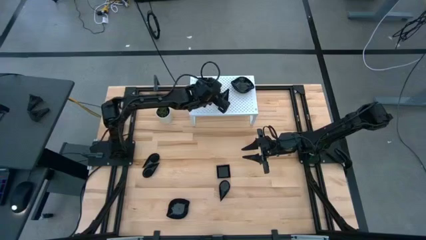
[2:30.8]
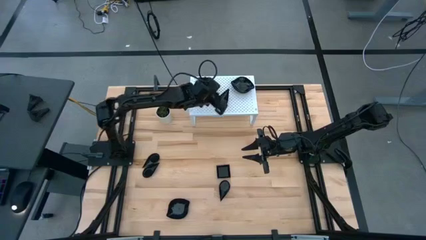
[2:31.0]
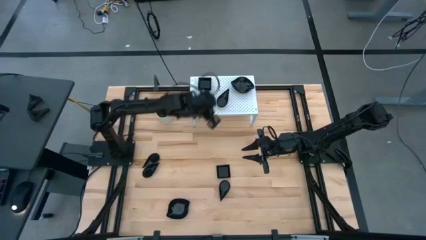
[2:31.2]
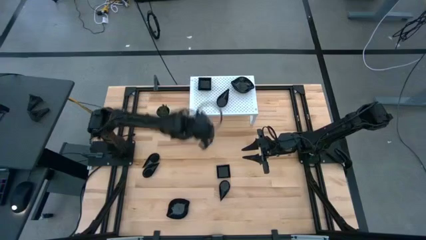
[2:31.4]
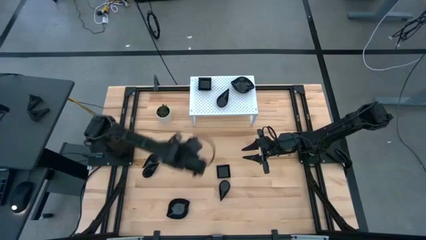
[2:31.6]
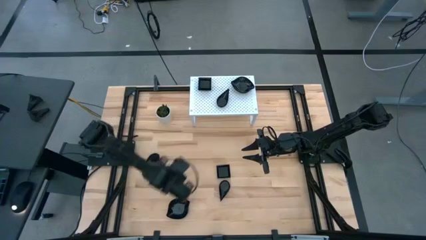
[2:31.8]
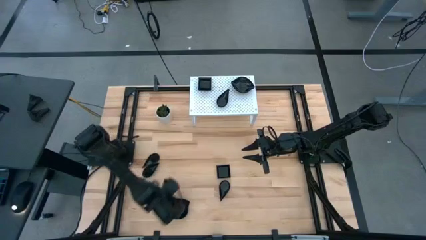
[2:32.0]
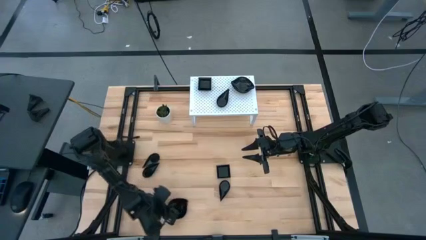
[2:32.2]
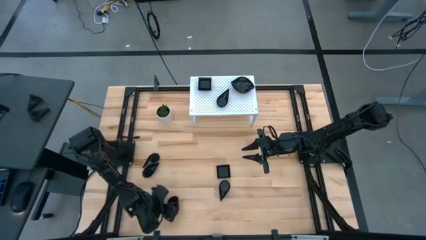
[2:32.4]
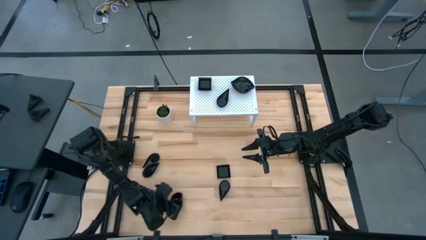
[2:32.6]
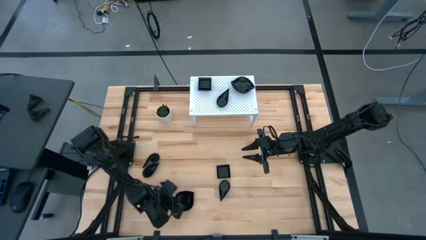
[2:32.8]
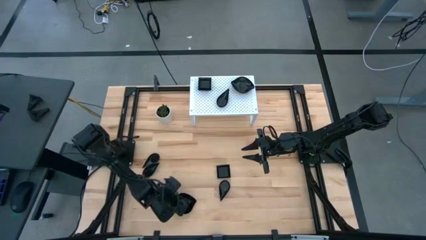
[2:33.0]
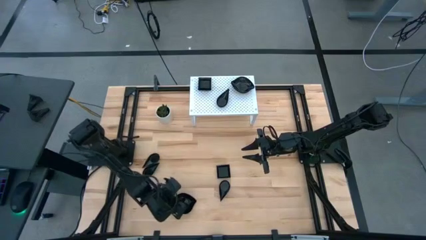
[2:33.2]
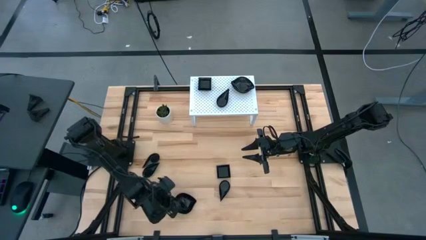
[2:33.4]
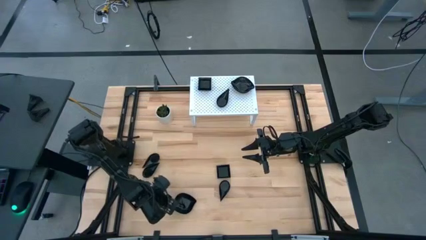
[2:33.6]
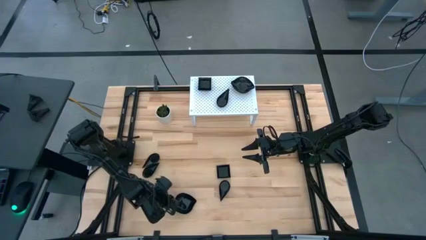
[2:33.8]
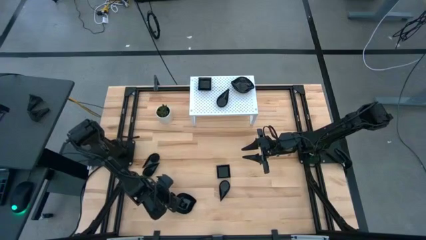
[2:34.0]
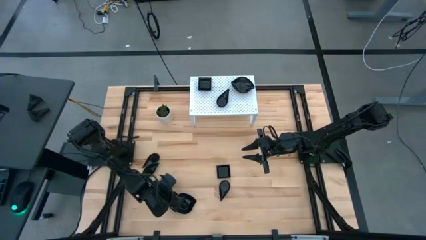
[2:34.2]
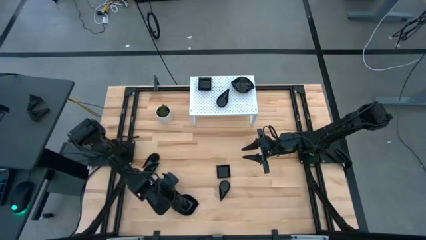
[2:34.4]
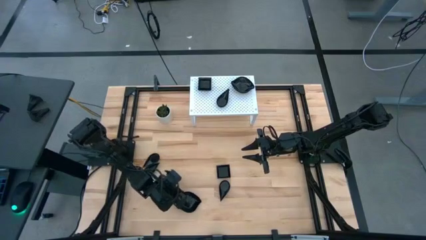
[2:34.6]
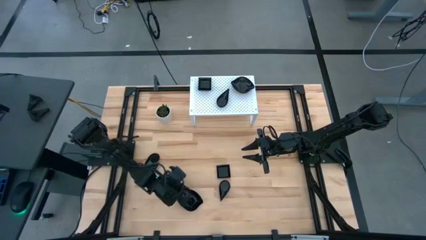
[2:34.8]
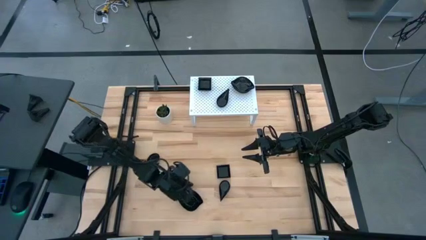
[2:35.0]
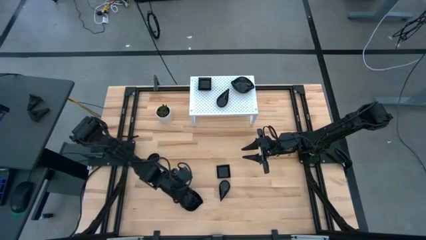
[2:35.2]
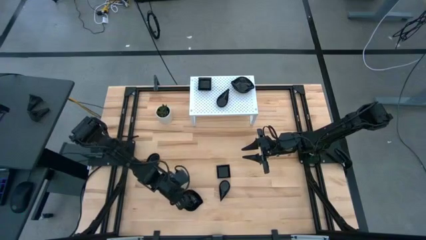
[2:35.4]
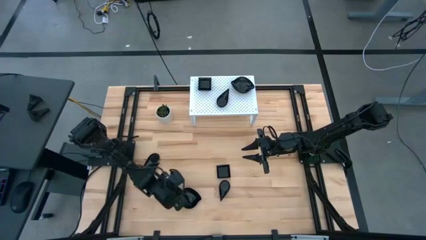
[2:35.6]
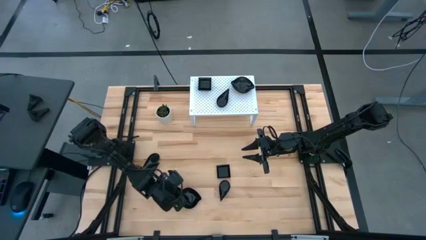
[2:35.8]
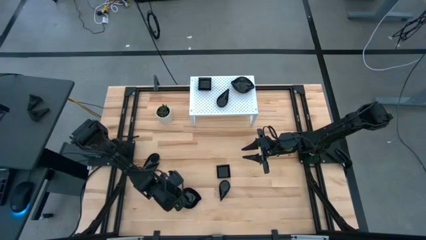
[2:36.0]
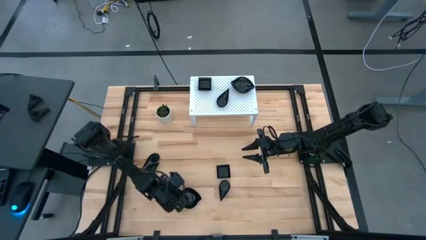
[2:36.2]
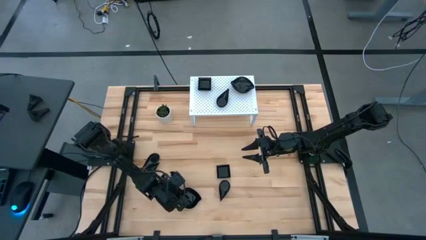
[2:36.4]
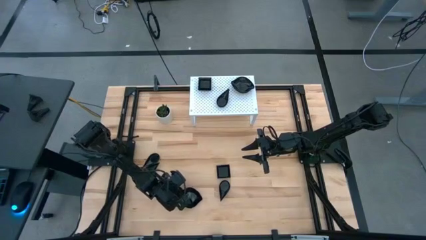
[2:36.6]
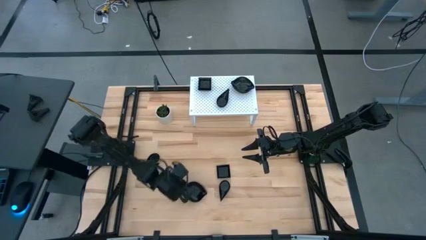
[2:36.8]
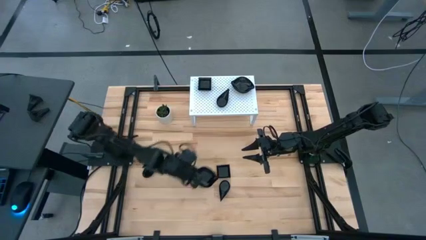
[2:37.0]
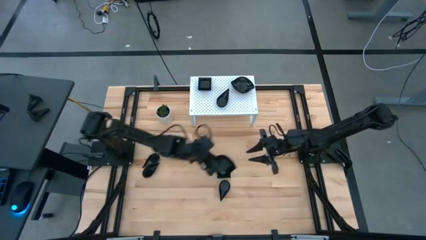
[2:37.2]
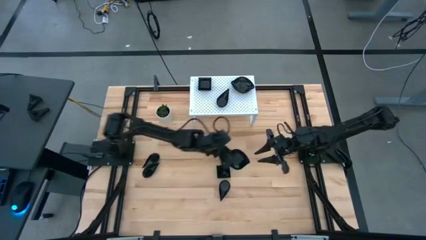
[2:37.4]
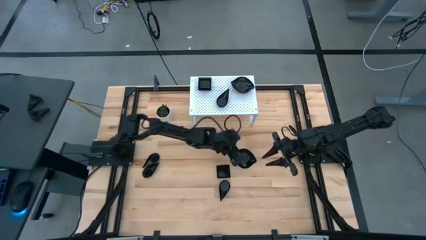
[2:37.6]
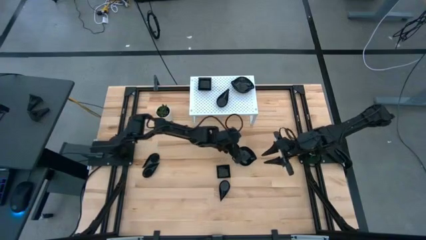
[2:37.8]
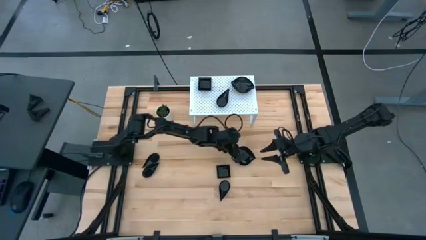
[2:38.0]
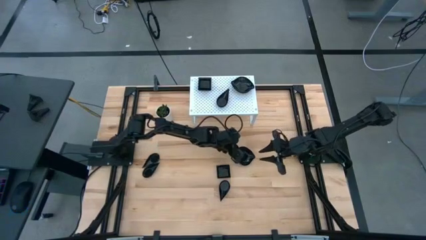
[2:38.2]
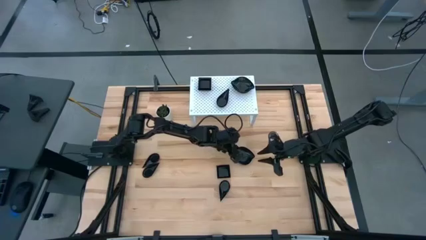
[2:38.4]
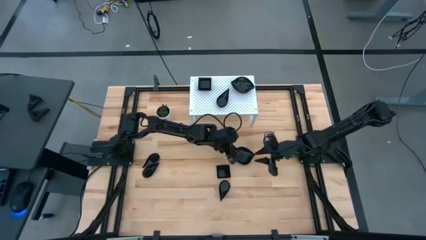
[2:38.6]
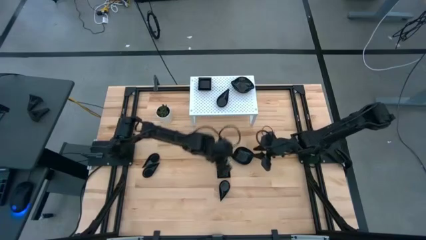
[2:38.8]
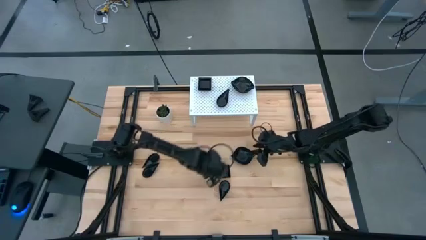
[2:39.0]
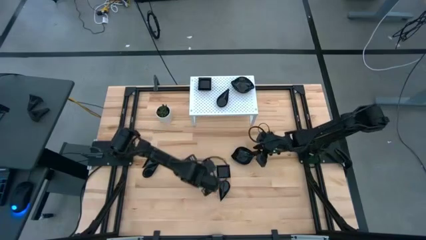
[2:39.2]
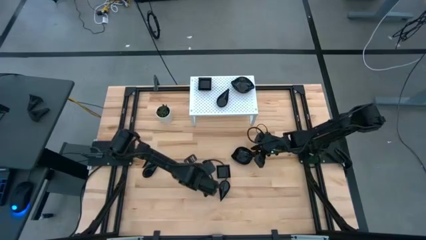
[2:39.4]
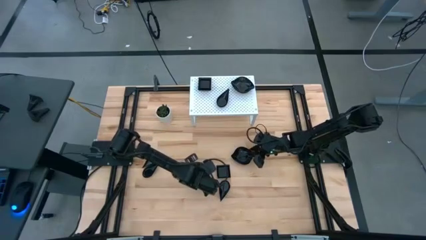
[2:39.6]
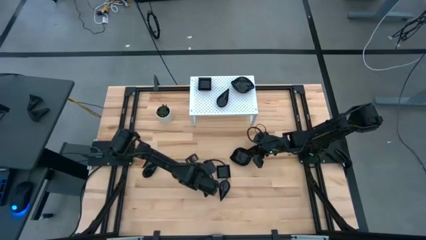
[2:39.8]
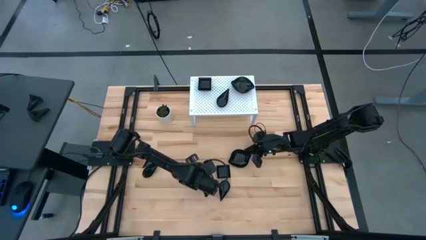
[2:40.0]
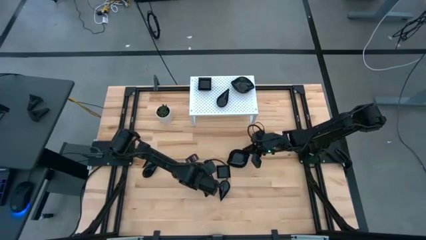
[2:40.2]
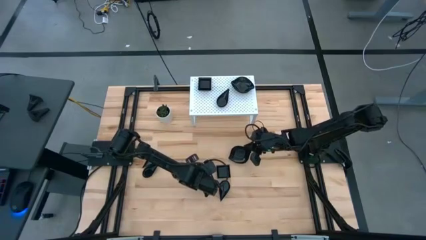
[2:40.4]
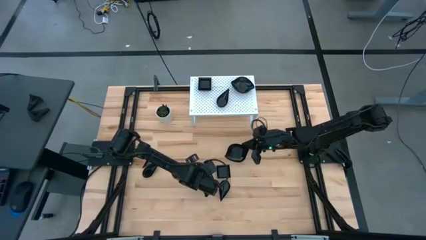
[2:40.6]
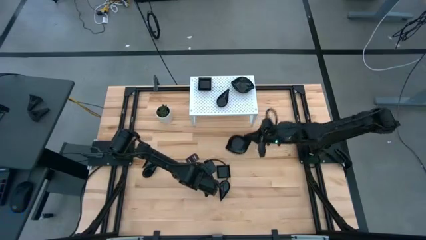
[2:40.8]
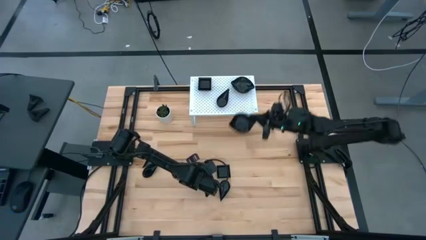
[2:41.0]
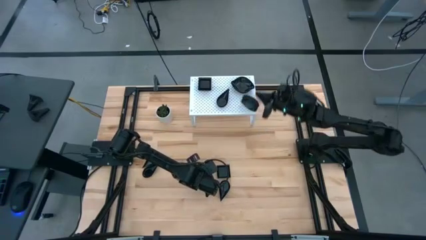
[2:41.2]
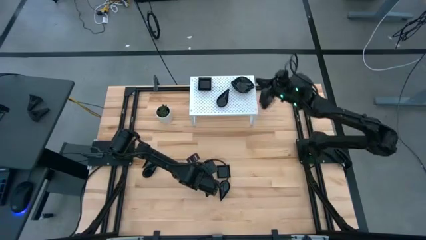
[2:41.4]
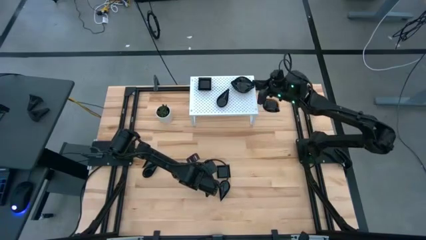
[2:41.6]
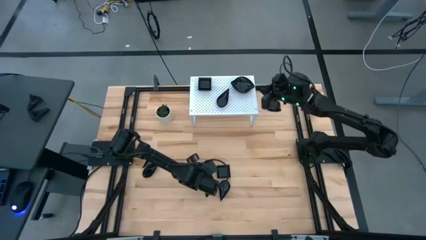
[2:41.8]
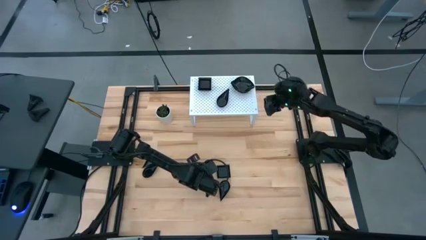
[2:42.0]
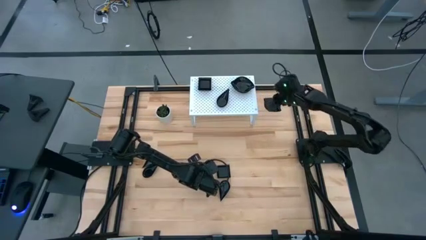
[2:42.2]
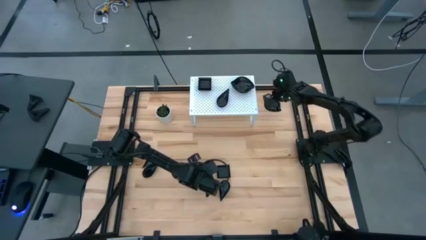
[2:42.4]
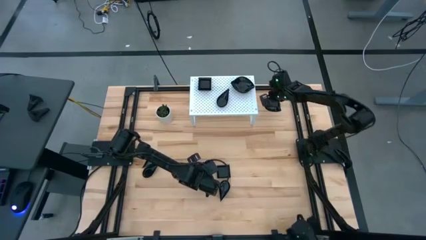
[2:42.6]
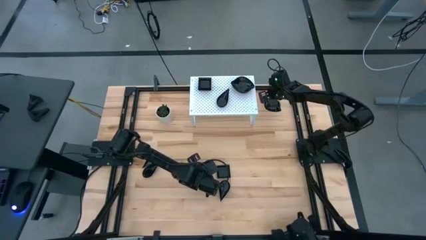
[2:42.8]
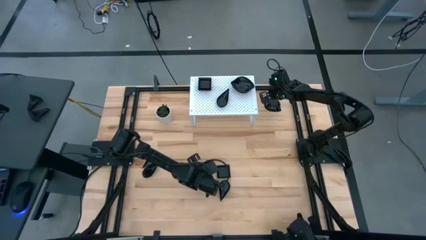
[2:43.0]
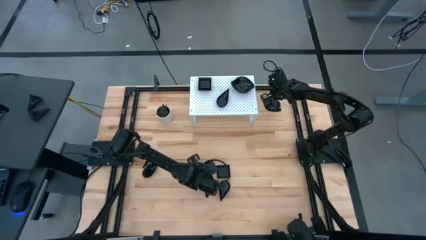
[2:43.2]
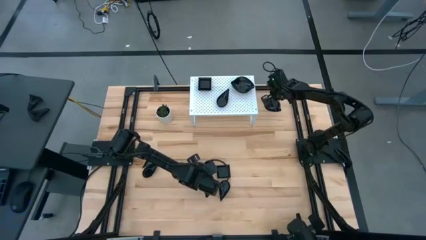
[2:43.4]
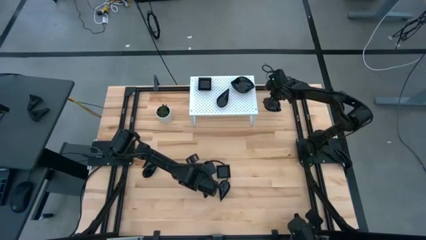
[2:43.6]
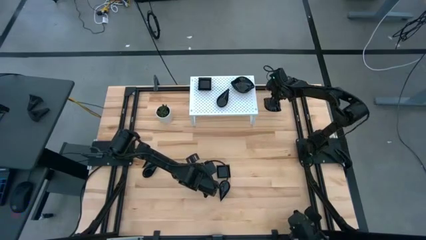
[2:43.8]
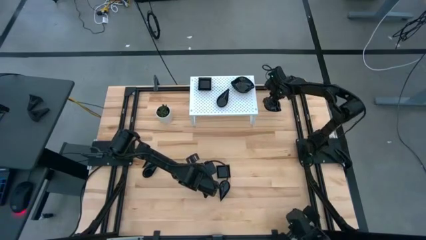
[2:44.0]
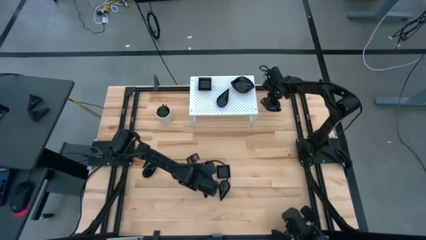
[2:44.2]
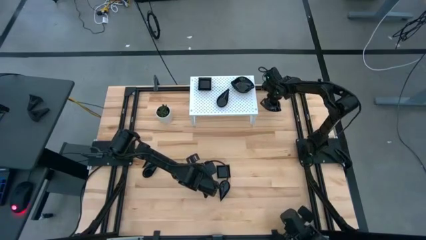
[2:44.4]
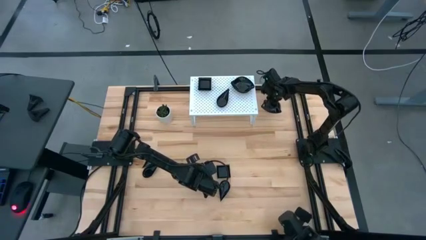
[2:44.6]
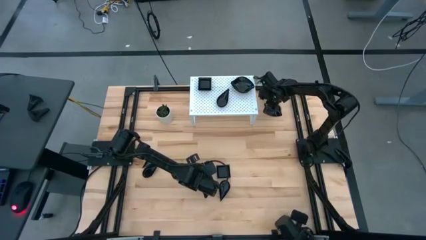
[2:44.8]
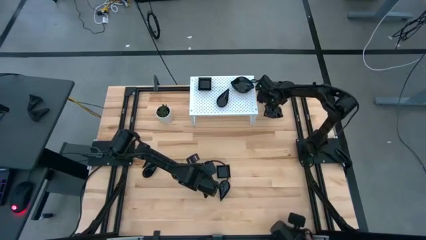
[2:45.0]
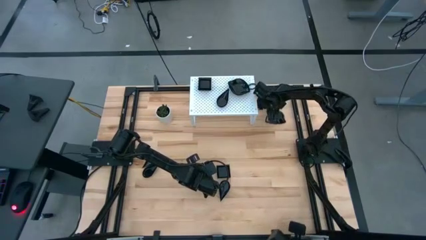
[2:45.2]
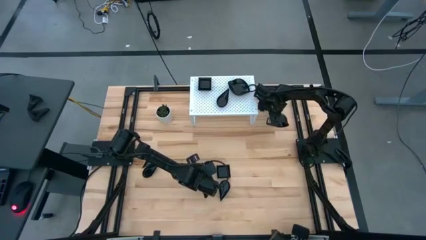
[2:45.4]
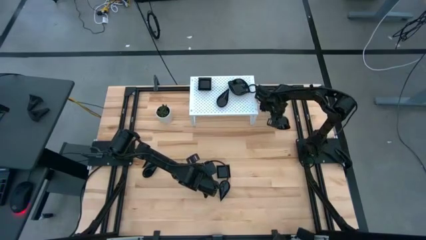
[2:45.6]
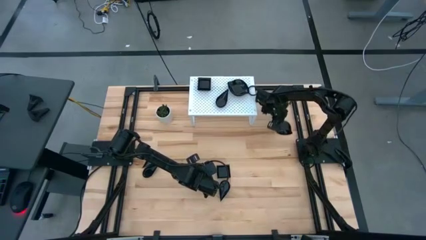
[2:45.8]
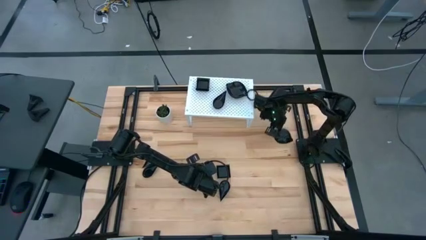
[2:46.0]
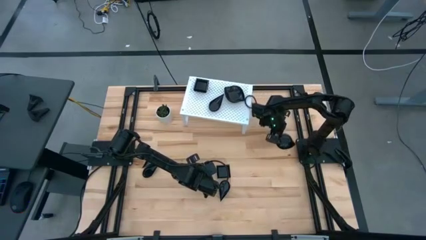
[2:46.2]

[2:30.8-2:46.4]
Task: Pick & Place Mini shaped plates
Stack the black plate on top of the black plate on the shelf

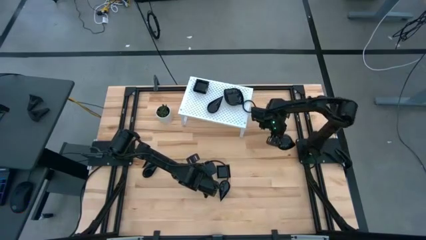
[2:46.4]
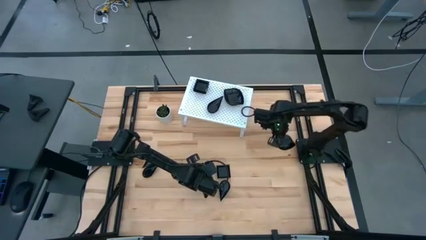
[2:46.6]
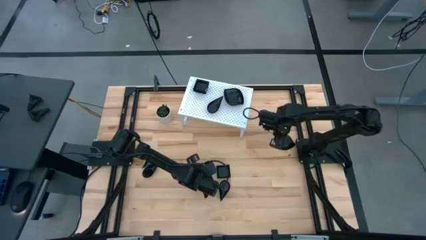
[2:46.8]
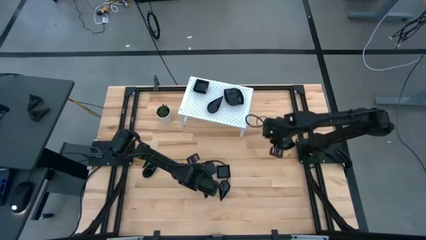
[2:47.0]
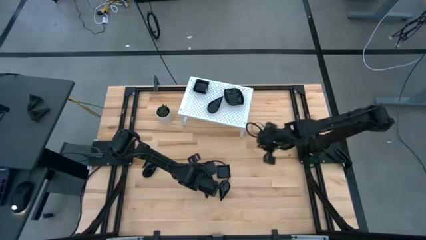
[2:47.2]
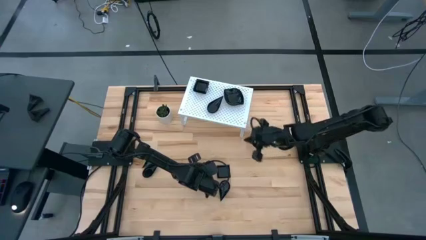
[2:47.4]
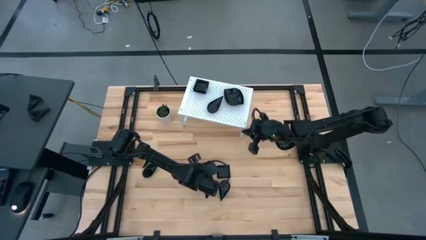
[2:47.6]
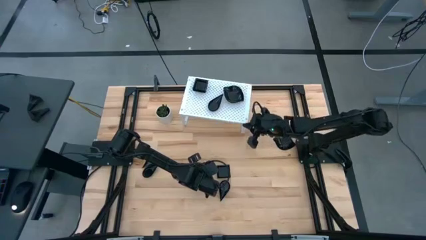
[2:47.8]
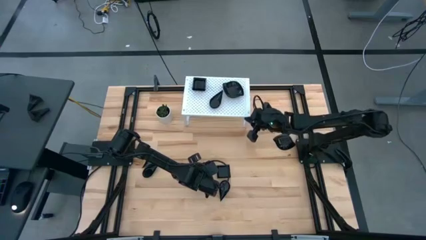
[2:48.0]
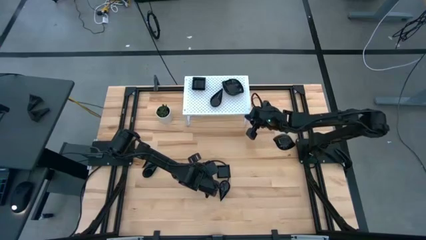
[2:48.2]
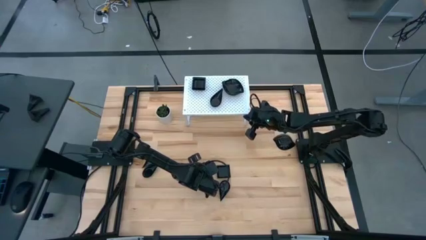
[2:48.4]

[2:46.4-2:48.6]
Adjust the shelf on the table
